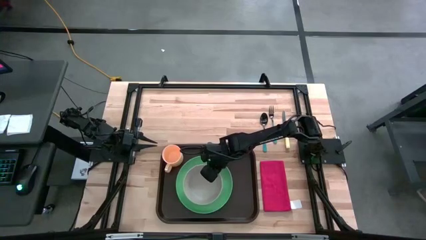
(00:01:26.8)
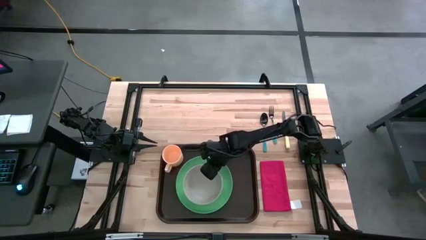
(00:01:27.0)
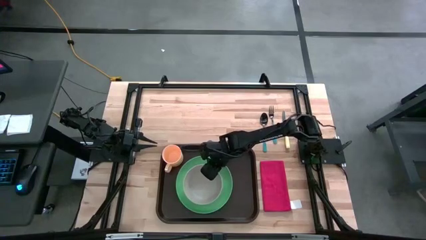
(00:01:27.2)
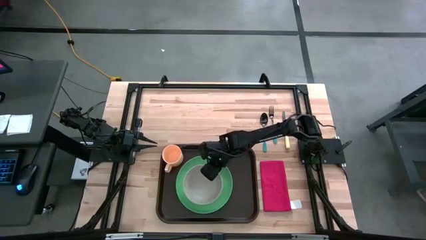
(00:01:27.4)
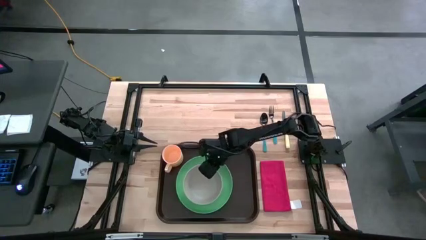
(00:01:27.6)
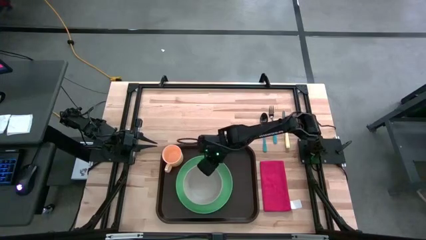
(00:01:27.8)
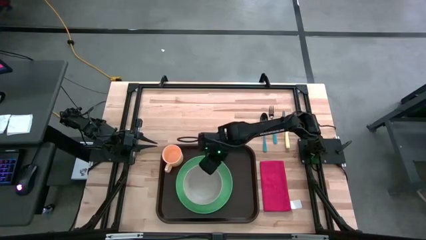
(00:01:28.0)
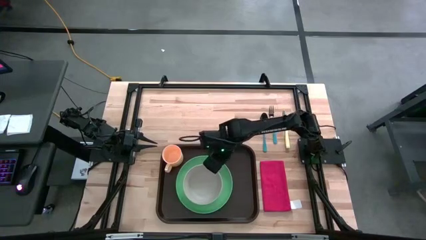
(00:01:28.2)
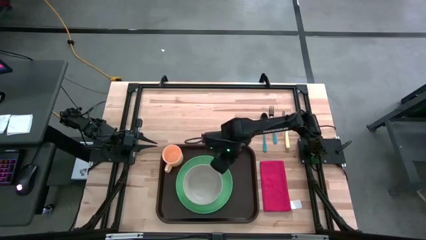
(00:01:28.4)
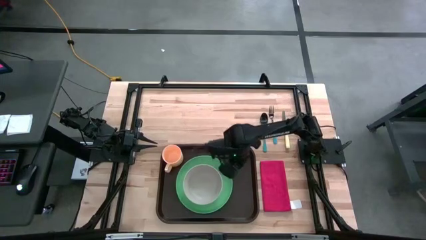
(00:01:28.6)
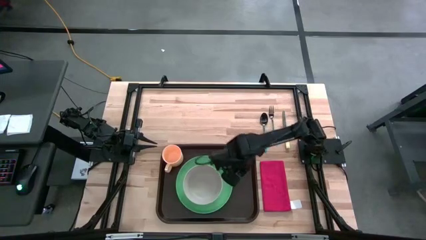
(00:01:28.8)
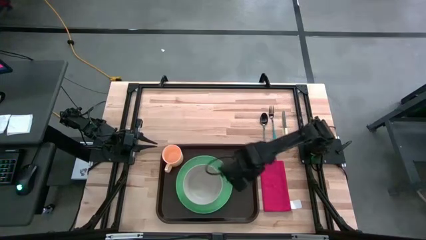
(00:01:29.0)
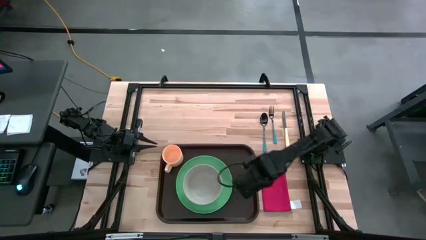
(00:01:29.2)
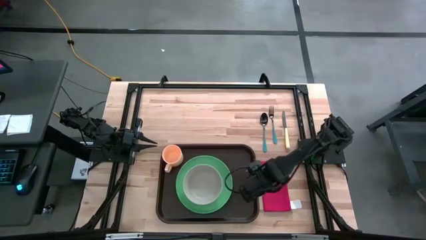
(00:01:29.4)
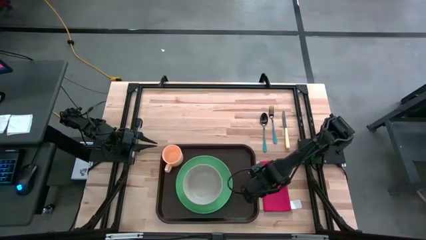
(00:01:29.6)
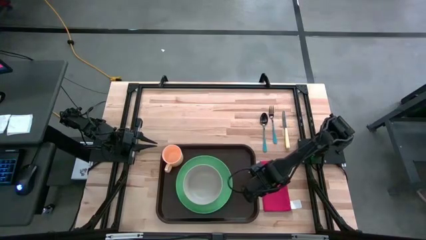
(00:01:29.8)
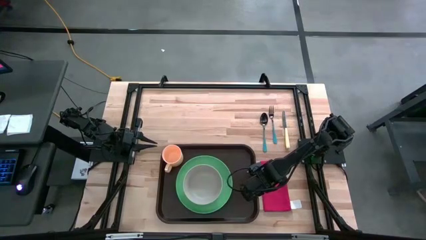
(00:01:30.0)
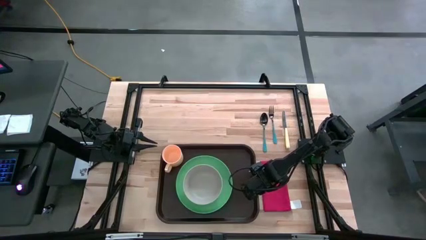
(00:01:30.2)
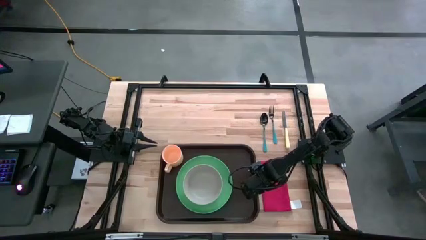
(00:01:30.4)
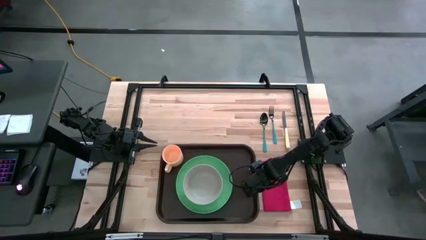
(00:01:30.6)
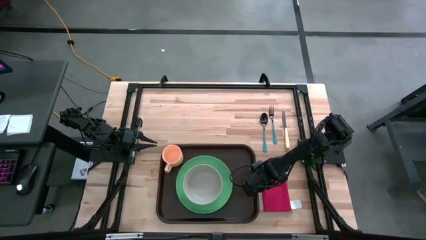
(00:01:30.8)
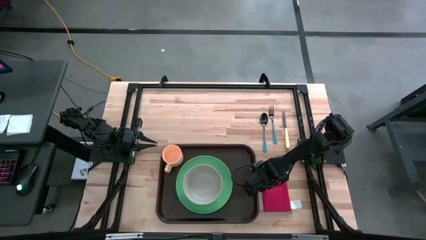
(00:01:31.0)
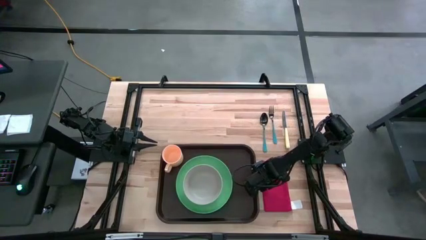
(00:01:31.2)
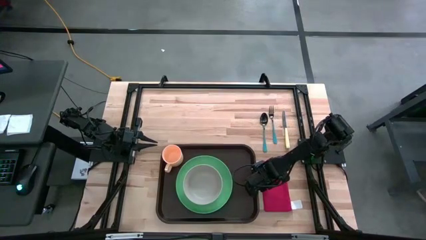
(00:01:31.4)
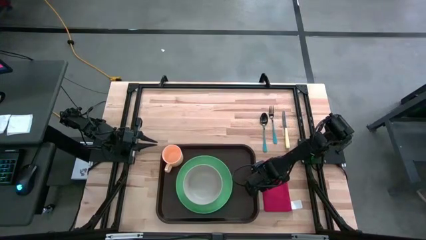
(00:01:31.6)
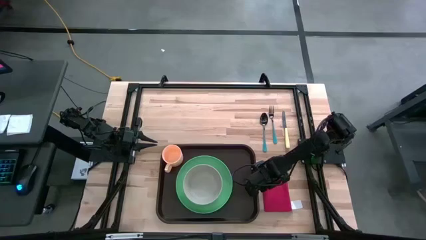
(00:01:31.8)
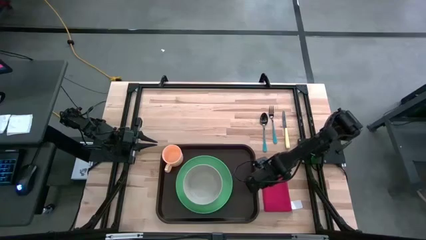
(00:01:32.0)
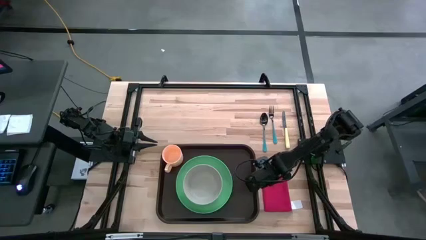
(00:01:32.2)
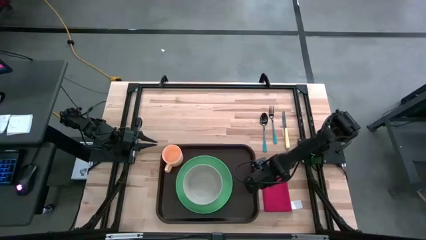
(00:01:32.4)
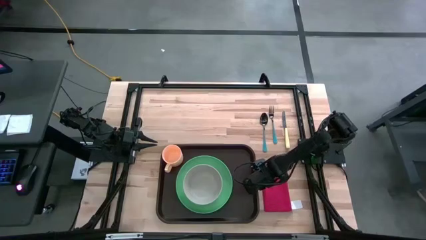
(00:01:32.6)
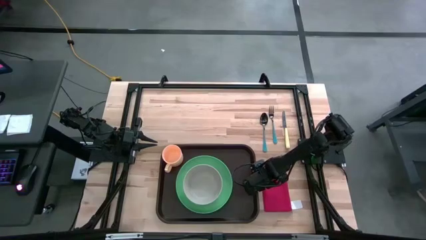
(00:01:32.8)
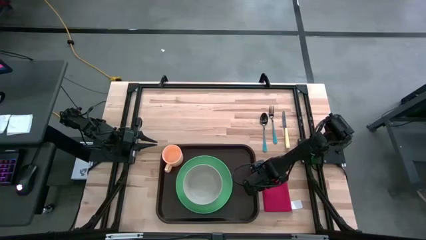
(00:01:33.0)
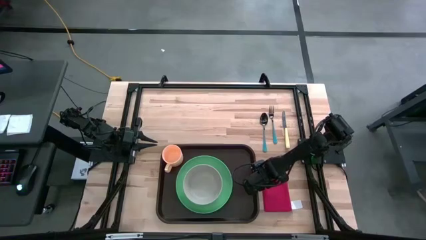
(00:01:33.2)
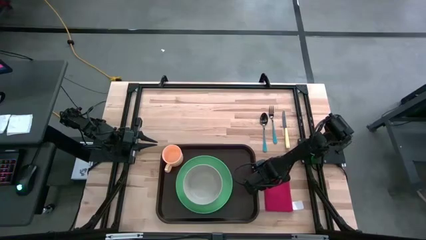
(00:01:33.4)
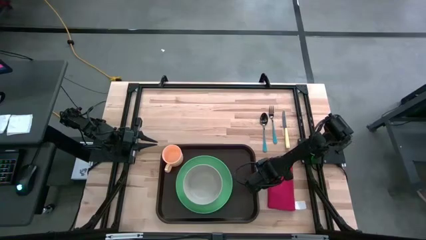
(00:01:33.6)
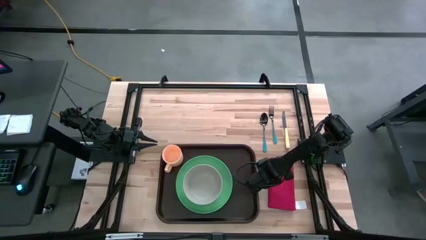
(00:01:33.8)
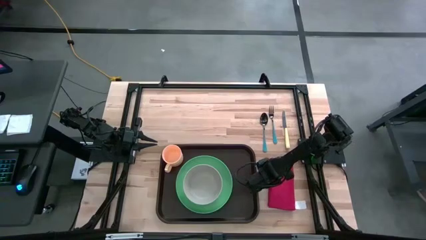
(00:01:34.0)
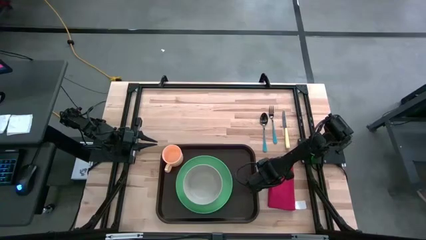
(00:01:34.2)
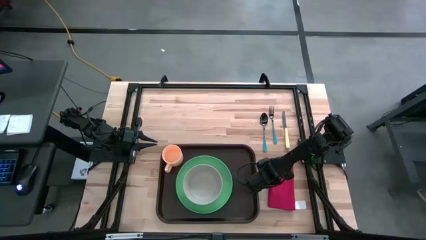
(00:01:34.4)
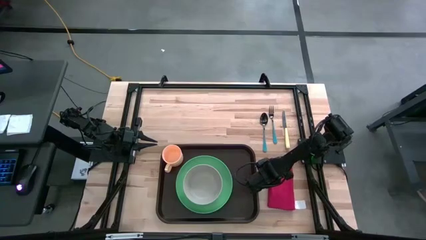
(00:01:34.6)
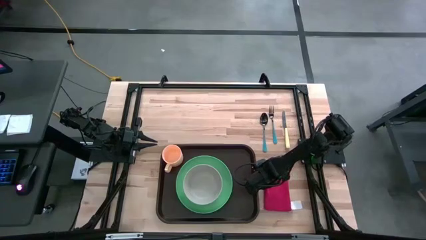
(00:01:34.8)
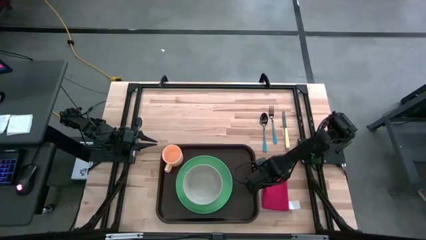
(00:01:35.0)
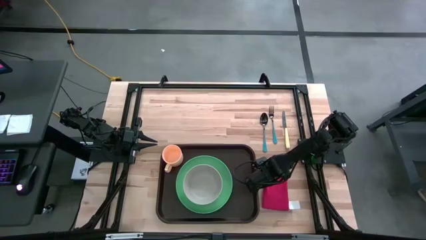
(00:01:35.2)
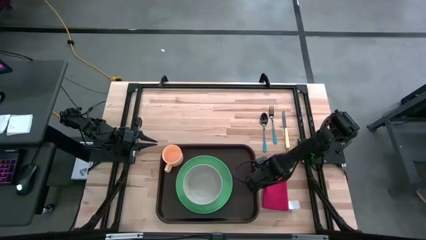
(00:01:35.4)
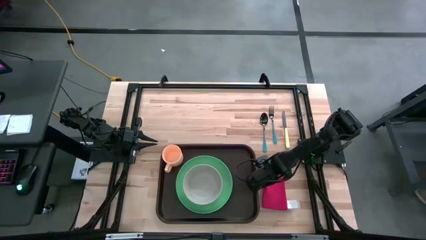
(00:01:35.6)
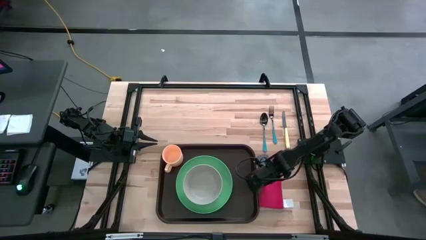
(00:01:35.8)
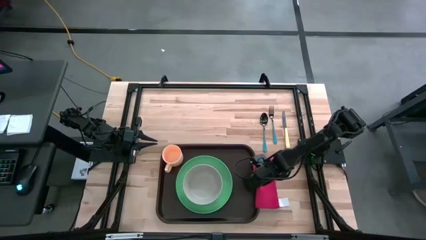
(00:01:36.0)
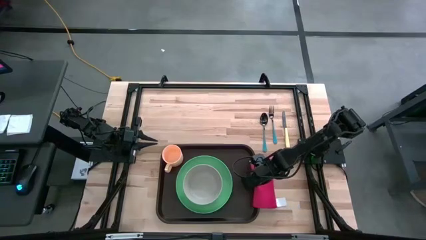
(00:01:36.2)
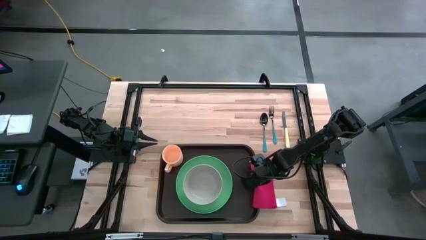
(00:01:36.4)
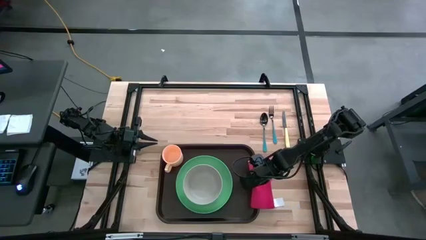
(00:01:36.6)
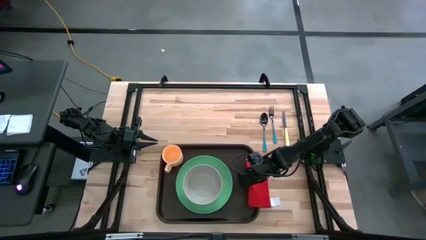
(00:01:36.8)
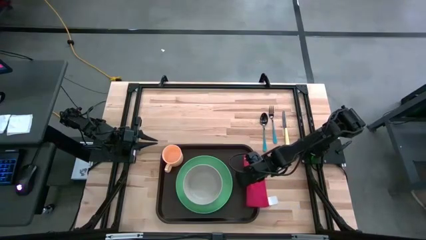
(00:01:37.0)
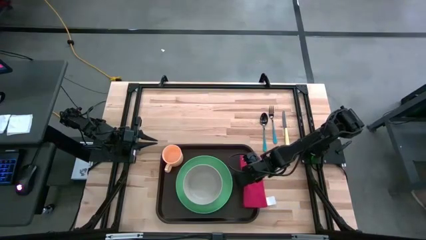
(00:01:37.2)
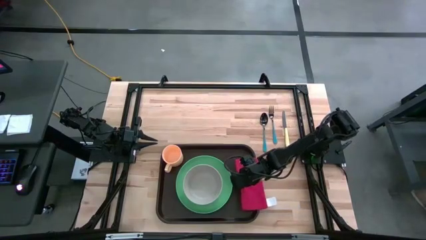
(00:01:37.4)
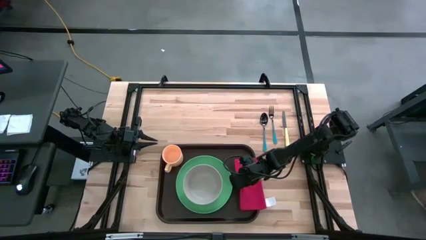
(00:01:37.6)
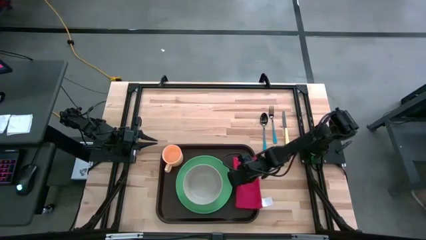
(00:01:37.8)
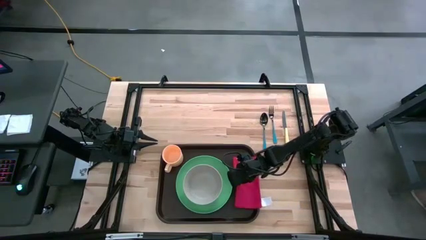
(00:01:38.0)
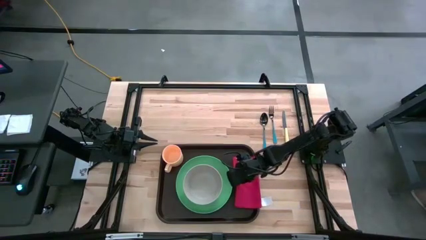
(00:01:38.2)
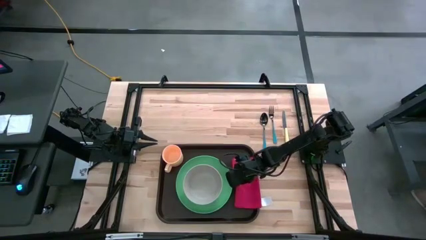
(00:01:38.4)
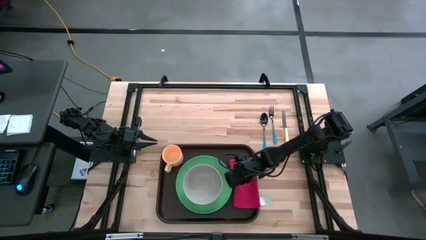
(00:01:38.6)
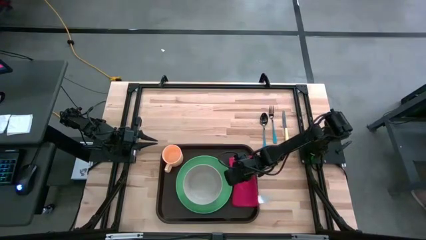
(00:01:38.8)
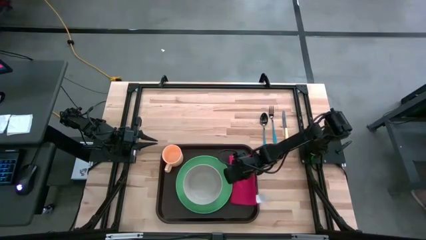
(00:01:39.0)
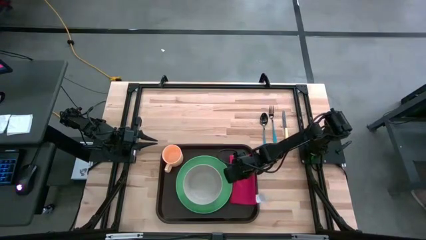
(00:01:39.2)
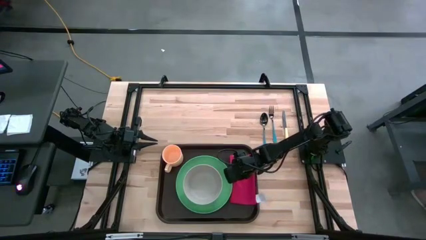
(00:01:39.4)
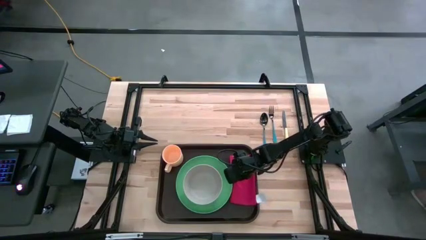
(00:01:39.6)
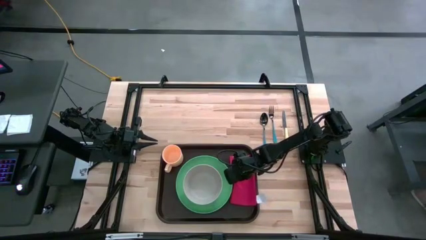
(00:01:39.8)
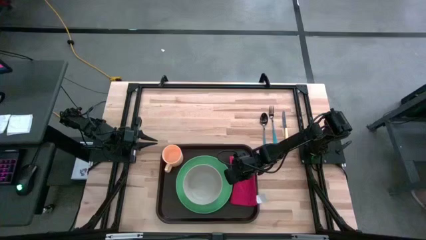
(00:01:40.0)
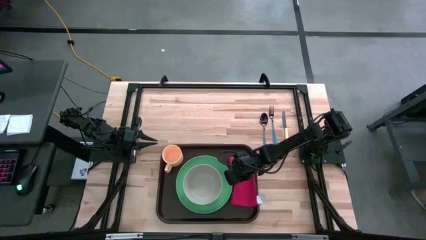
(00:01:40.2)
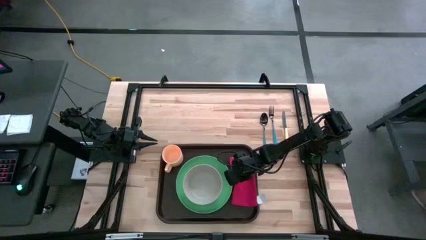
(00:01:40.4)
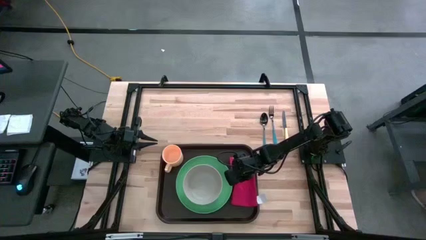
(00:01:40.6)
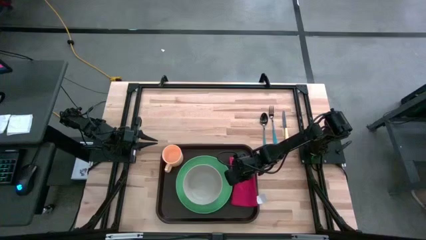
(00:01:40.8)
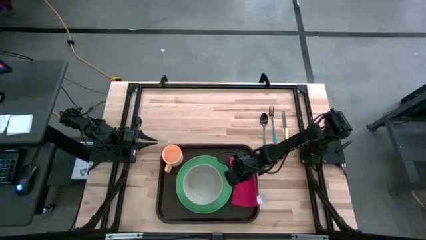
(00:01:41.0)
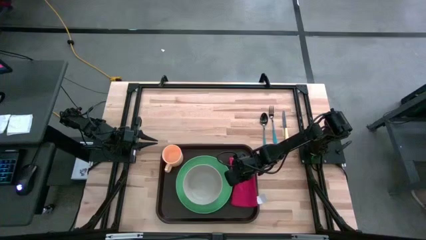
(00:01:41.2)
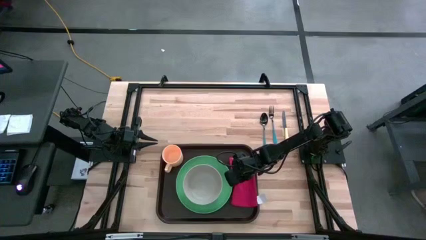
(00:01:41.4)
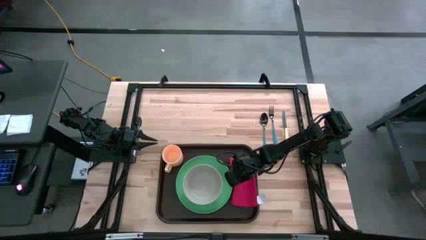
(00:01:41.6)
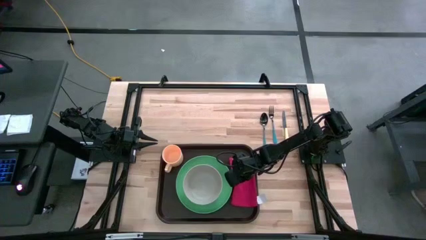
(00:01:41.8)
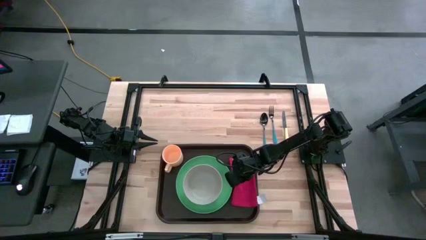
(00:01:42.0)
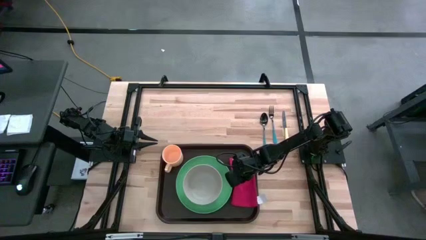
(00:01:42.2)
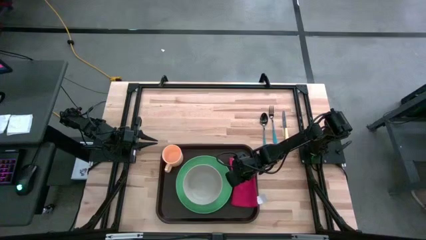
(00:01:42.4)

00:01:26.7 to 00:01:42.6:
Task: Set up tray
Put the table napkin to the right of the green plate on the serving tray
